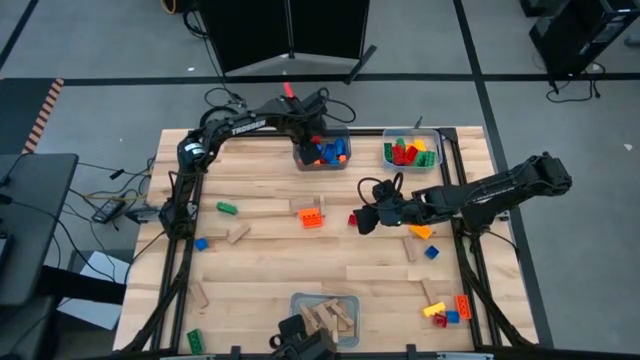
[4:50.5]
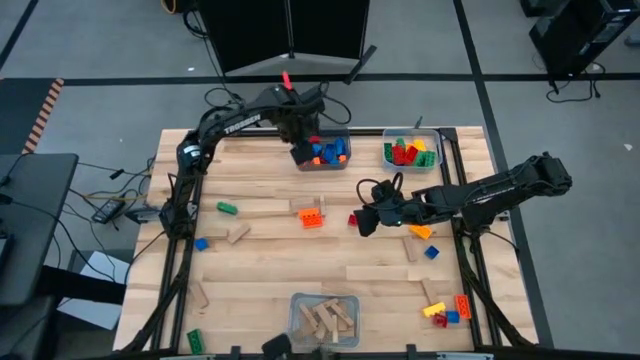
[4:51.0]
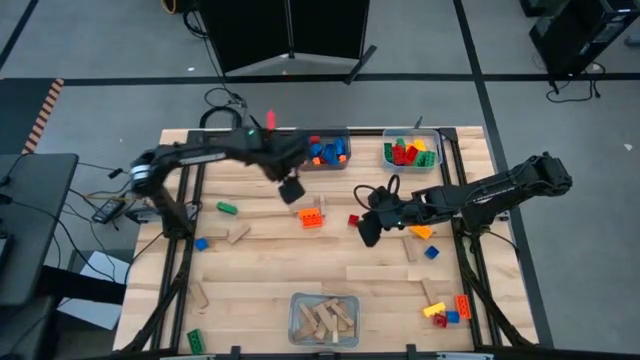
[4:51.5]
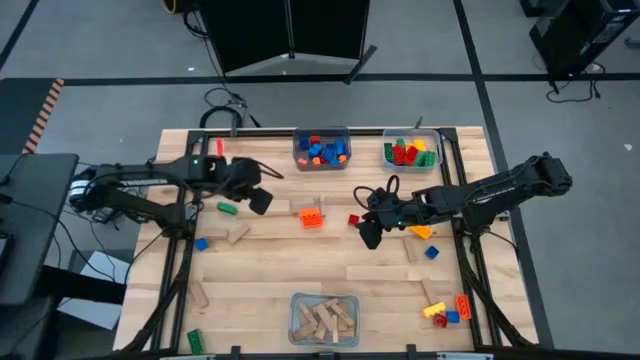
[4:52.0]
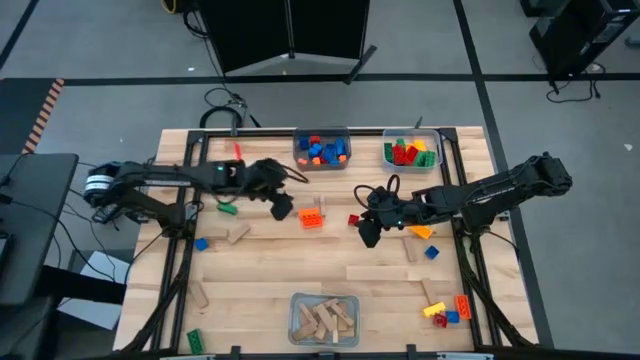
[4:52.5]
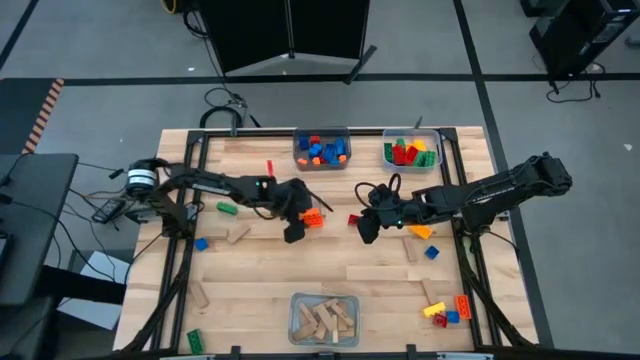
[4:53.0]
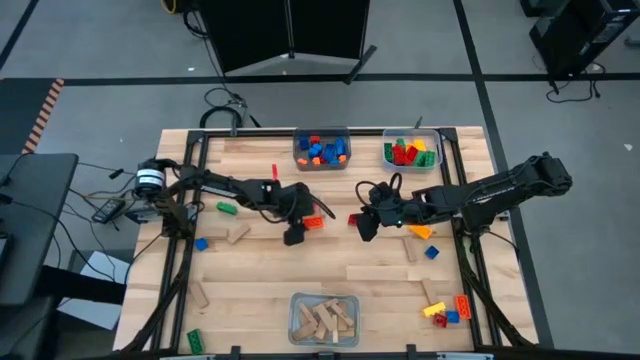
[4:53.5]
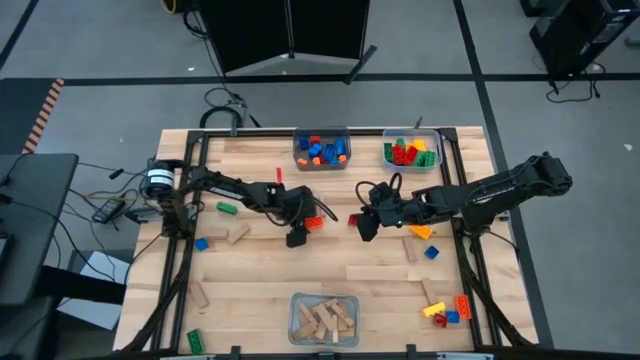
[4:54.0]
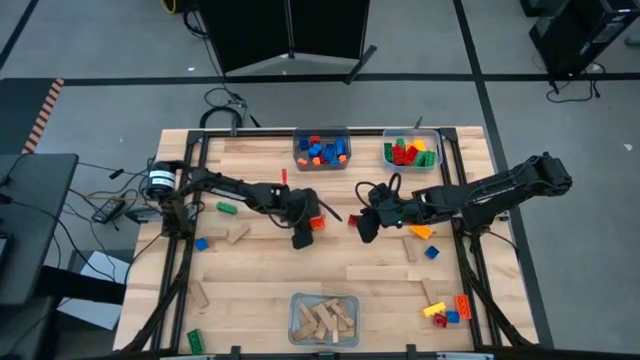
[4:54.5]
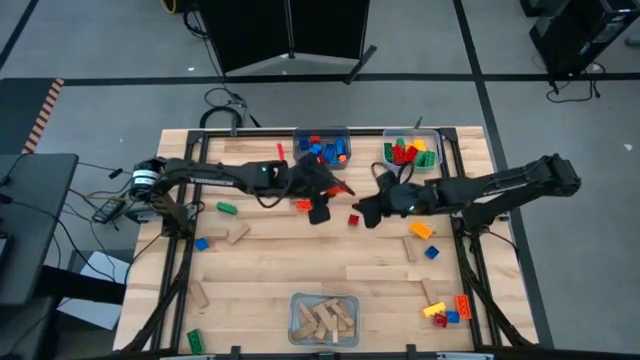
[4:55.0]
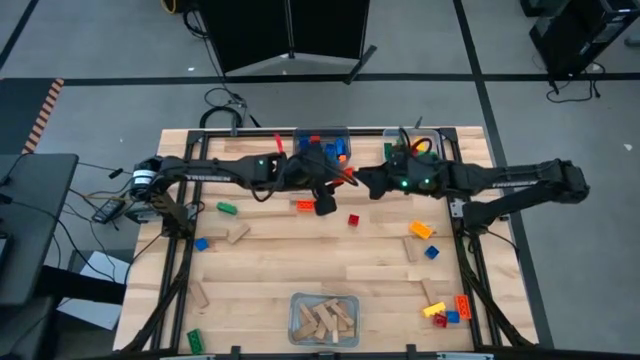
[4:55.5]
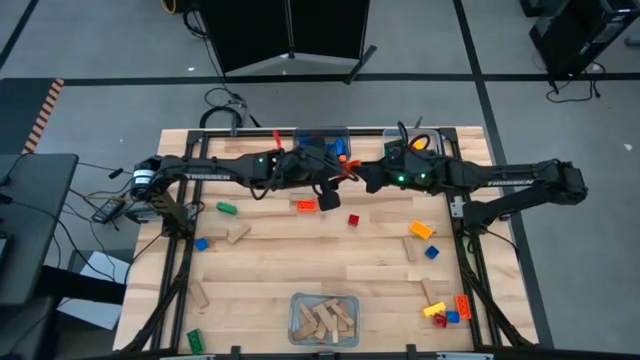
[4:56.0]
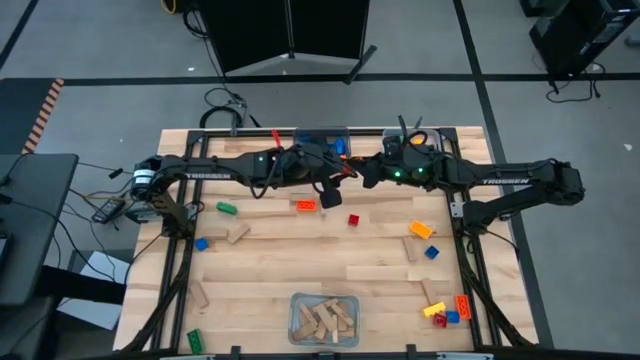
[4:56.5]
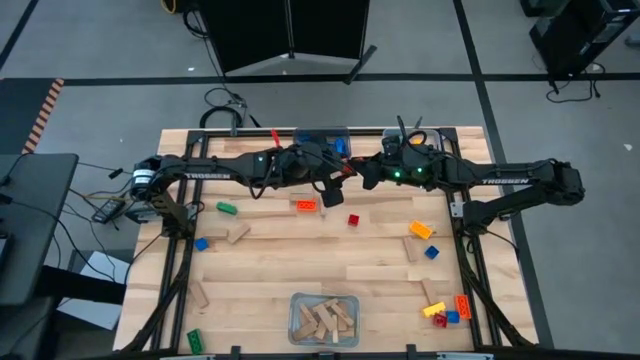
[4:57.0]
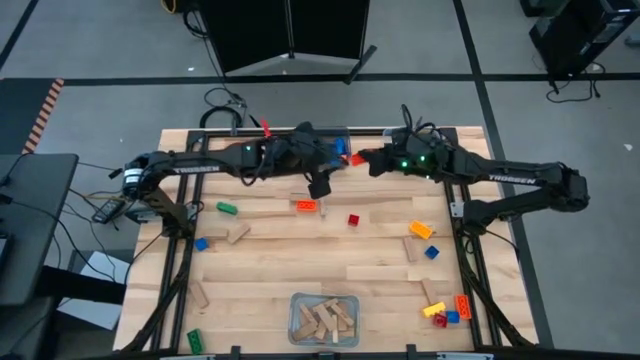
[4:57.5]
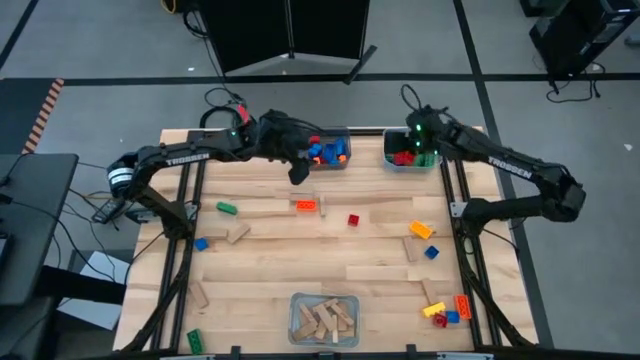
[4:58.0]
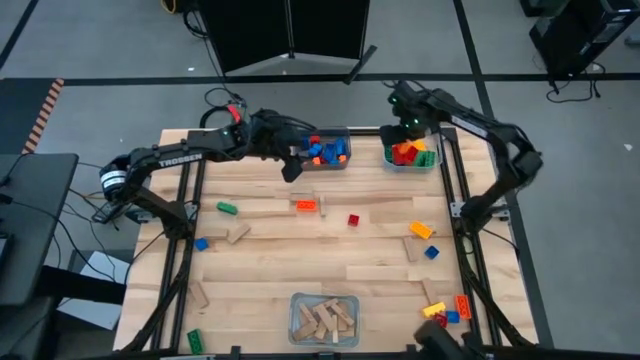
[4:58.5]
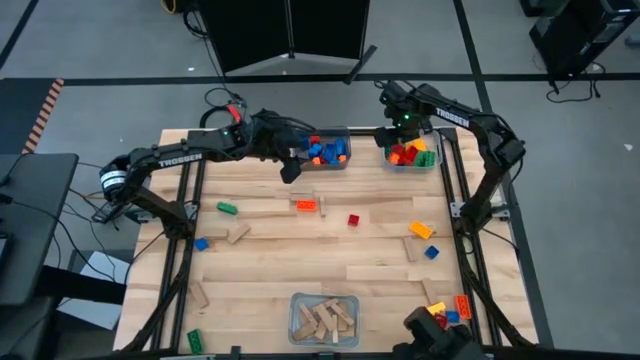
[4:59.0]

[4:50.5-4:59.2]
Task: Sort blocks by size
Put the large orange game piece into the transparent bin

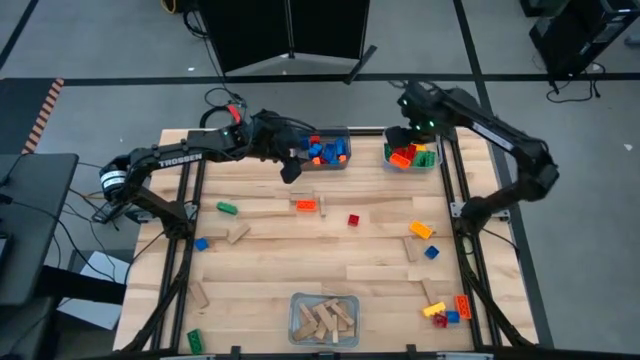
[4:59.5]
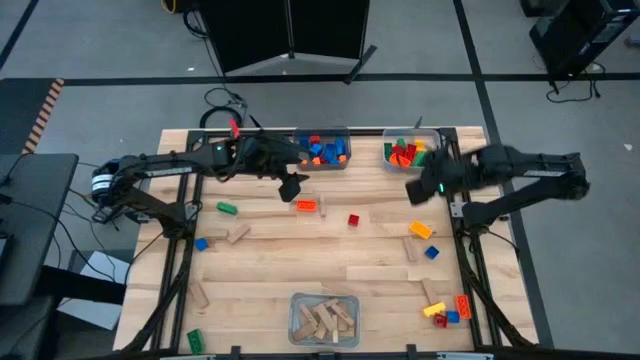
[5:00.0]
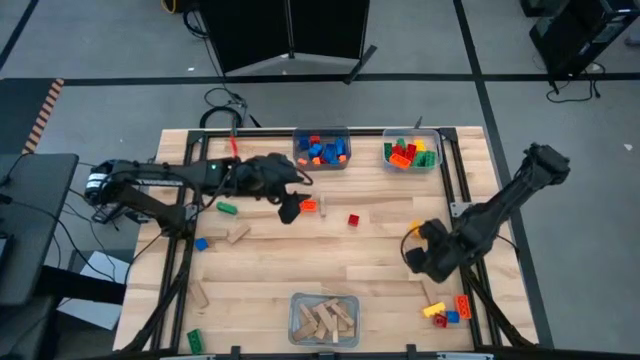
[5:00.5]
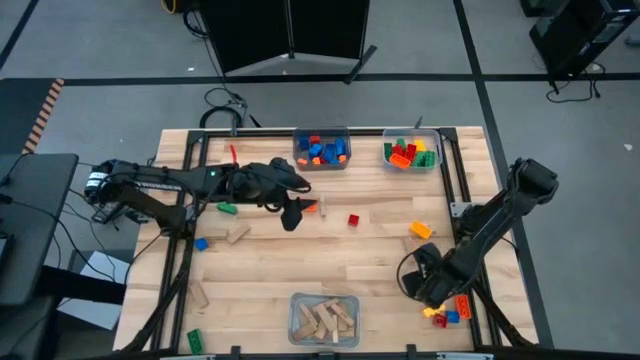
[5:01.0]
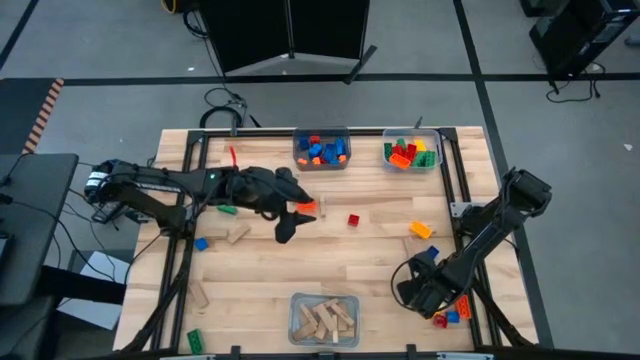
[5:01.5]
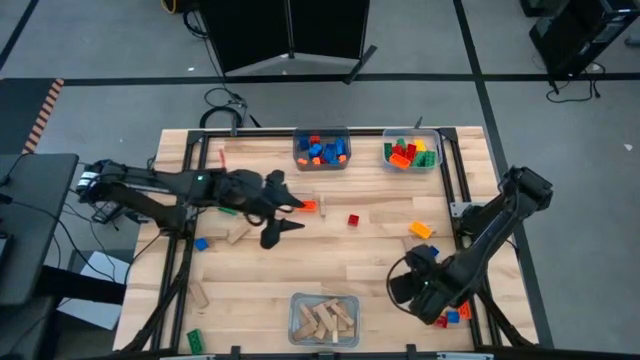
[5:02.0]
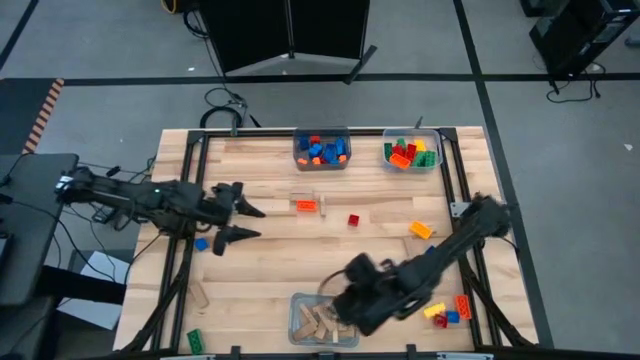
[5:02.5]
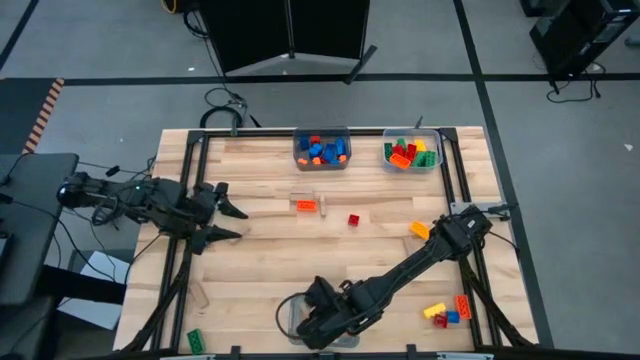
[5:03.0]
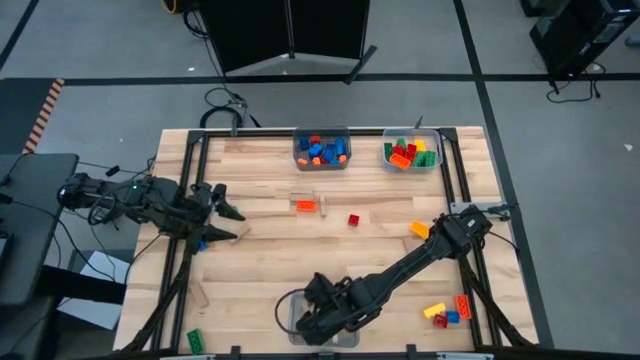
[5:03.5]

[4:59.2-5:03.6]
Put the brown block into the gray bin

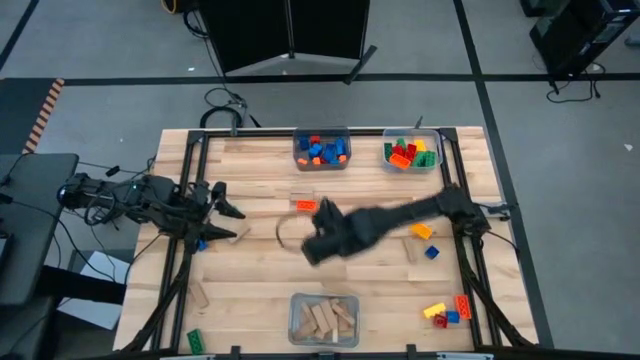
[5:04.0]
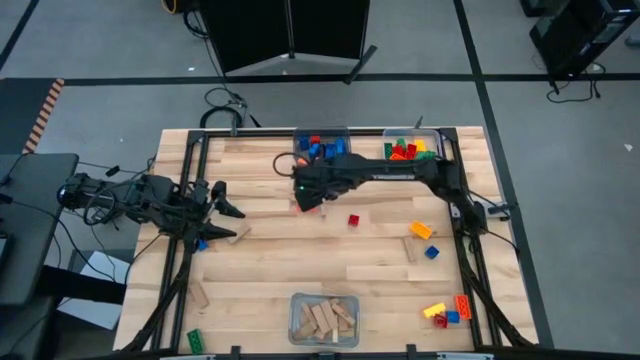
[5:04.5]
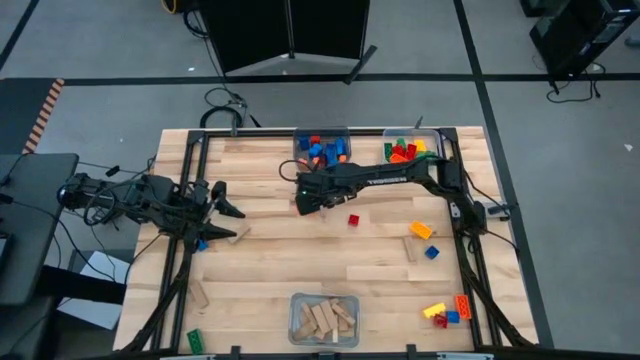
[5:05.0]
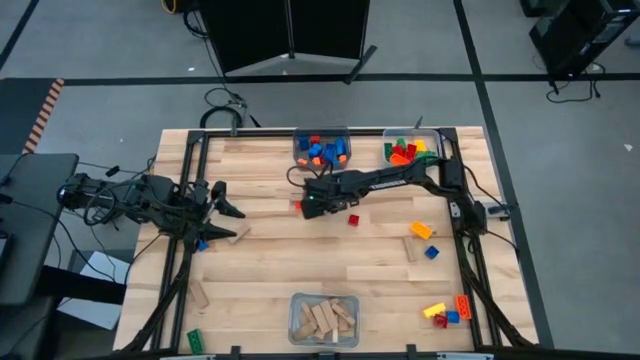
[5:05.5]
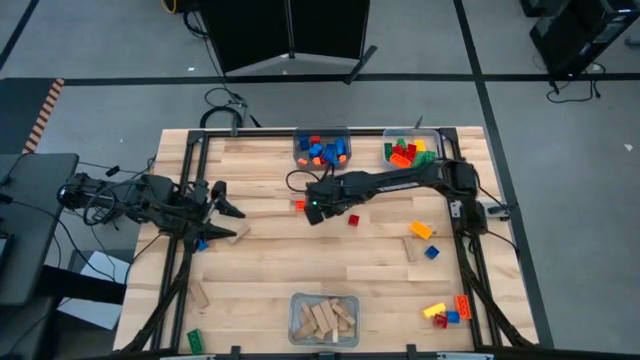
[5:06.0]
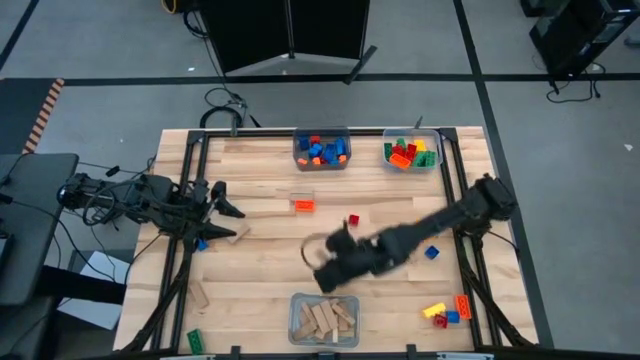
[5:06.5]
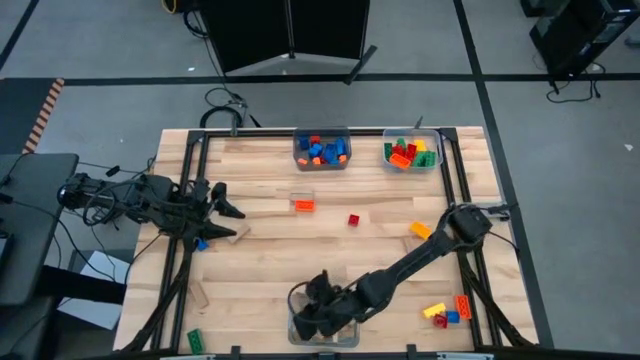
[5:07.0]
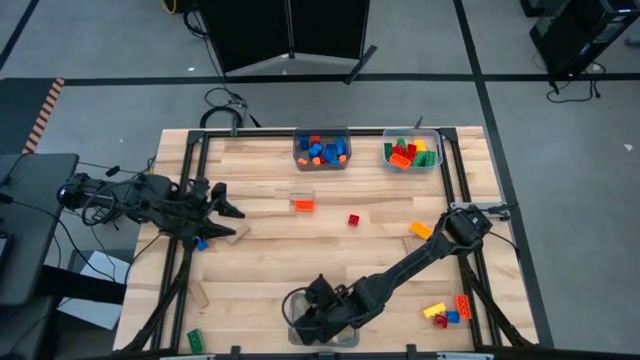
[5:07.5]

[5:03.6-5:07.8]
Put the brown block into the gray bin

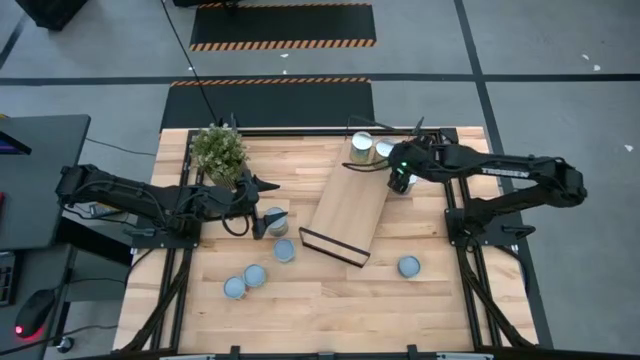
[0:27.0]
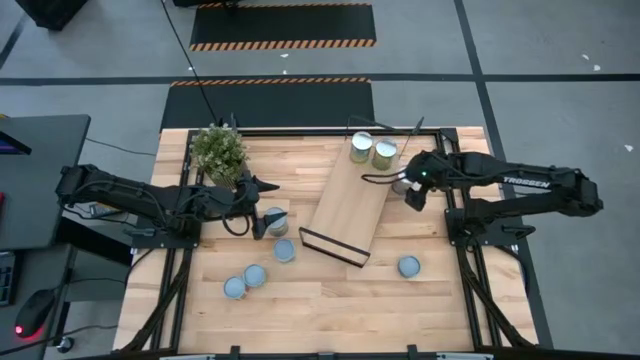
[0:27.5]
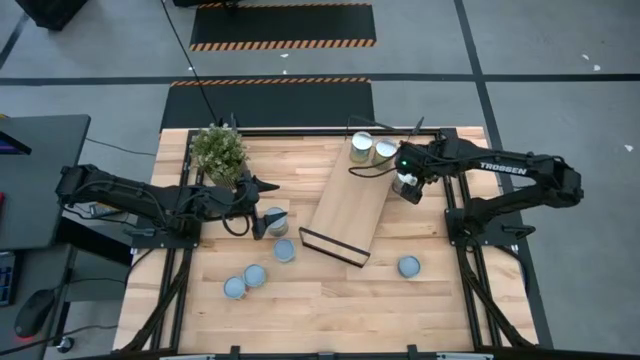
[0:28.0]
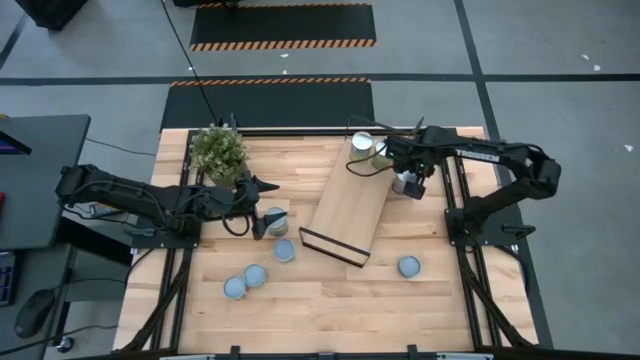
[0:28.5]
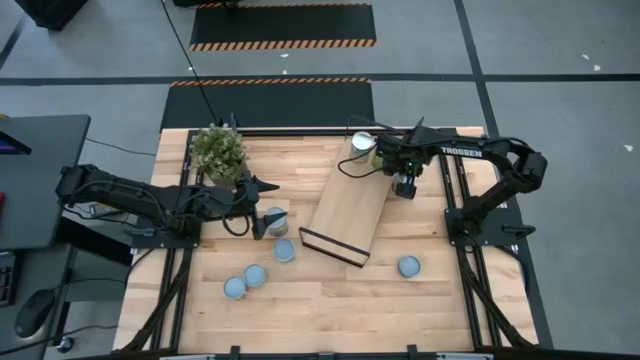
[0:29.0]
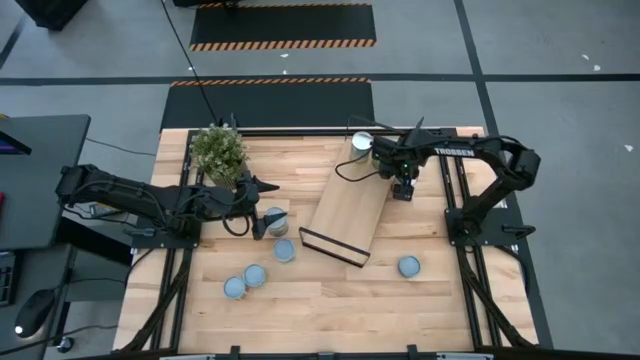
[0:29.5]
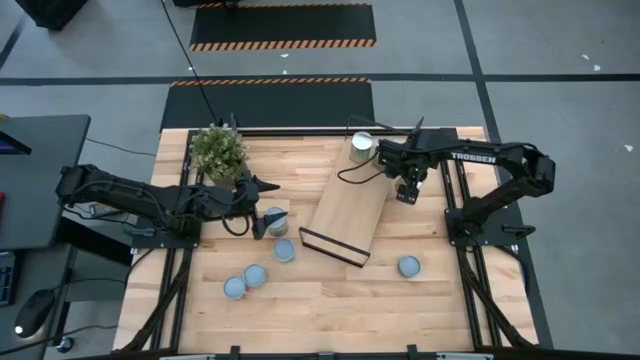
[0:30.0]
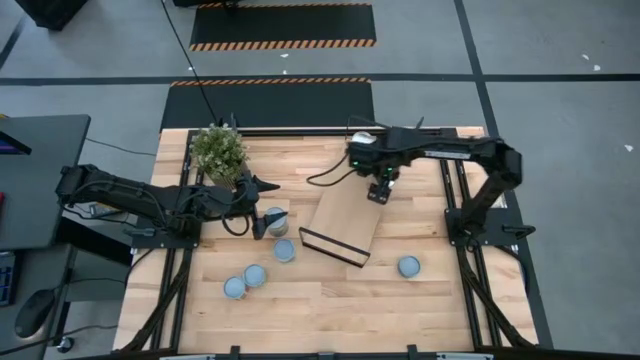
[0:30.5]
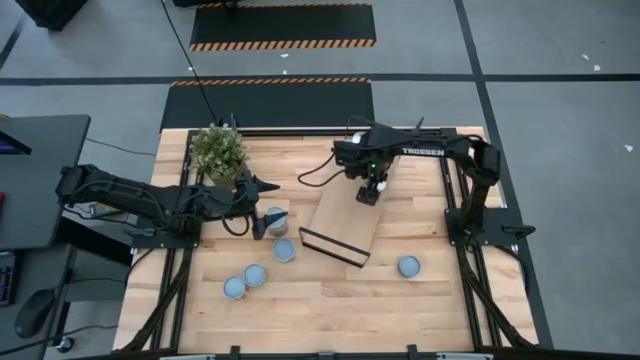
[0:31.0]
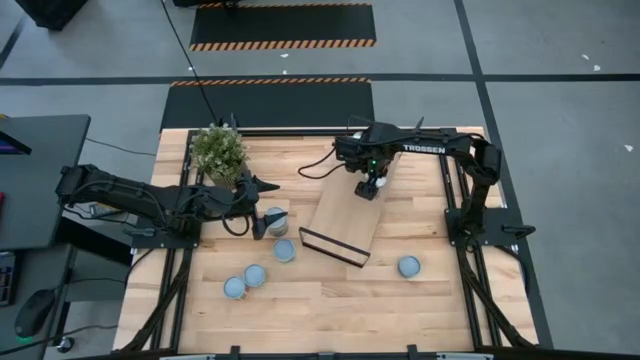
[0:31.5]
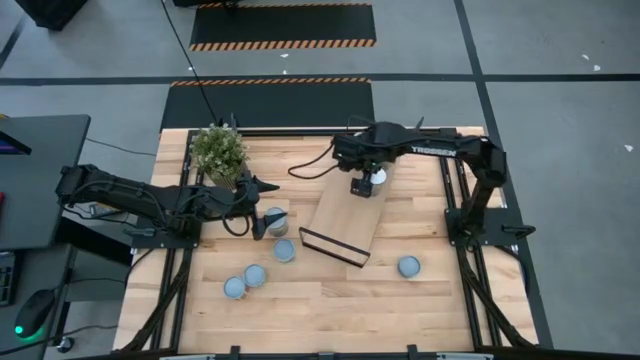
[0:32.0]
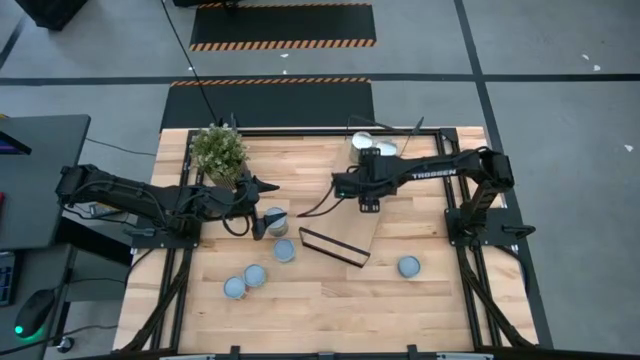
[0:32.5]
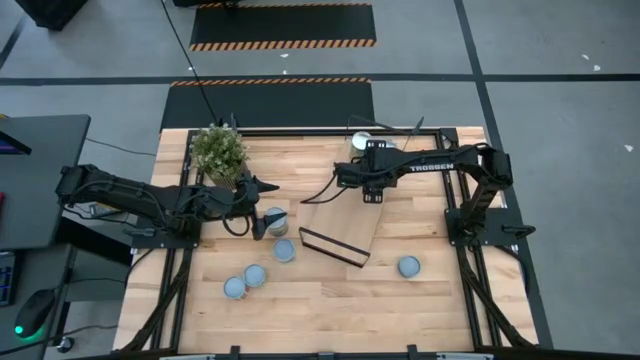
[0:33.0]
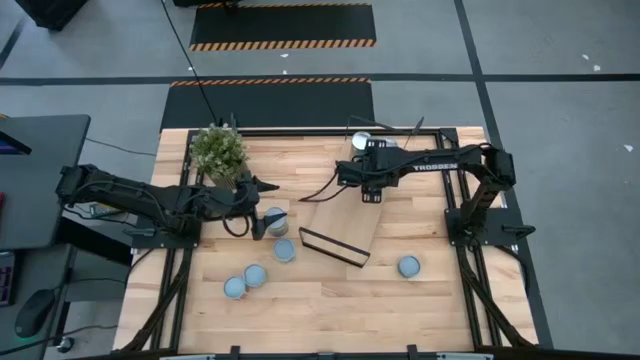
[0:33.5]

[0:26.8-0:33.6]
Task: Pick and place cans onto a shelf
Put the canned peaches on the shelf
